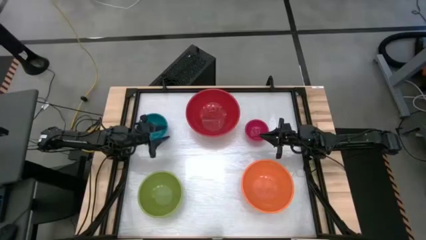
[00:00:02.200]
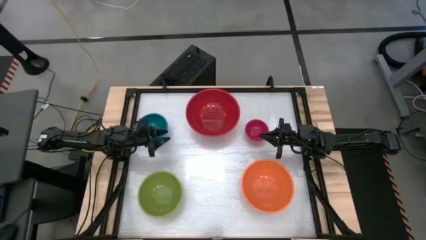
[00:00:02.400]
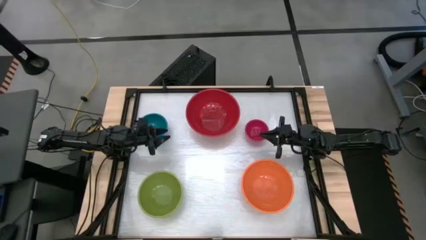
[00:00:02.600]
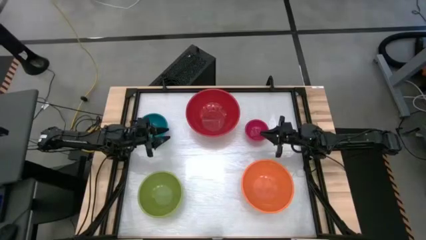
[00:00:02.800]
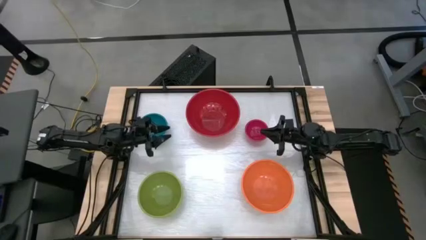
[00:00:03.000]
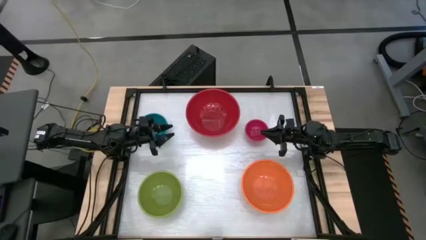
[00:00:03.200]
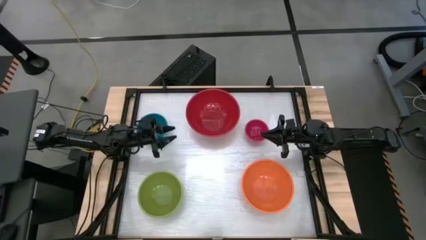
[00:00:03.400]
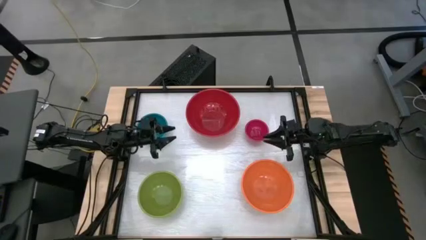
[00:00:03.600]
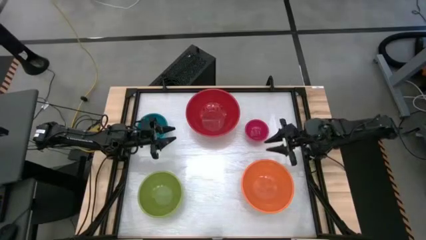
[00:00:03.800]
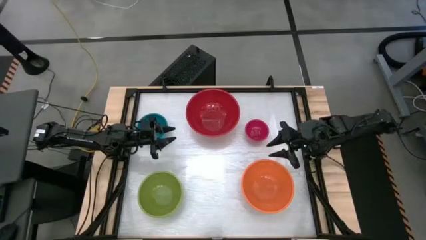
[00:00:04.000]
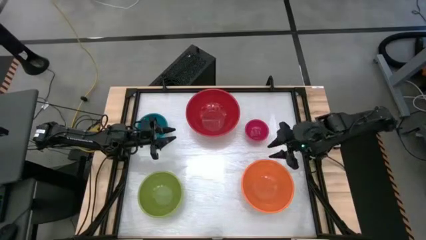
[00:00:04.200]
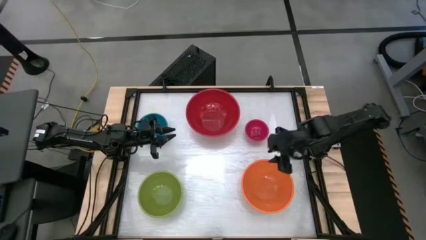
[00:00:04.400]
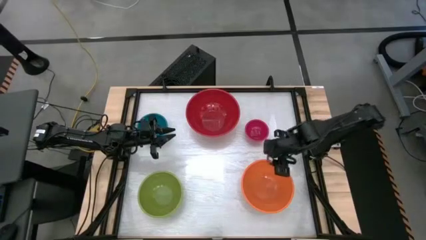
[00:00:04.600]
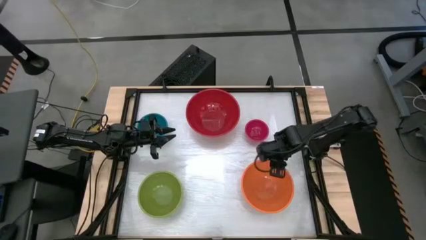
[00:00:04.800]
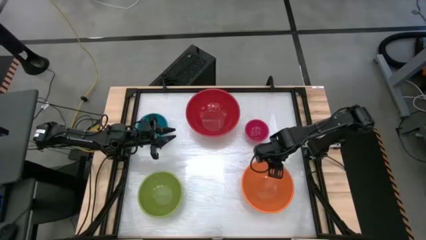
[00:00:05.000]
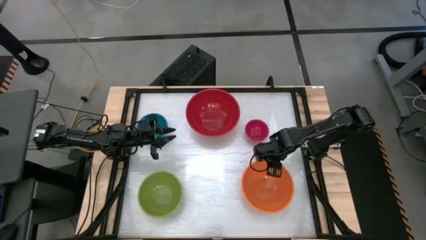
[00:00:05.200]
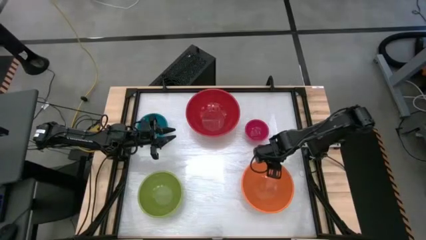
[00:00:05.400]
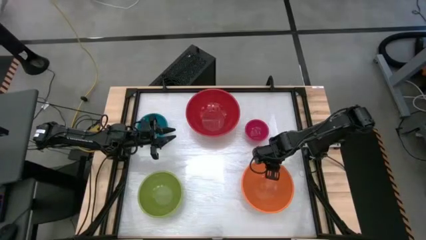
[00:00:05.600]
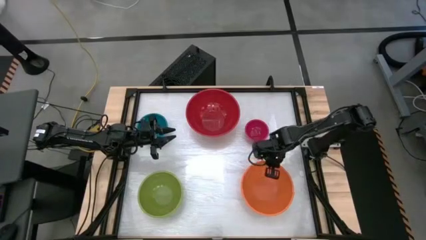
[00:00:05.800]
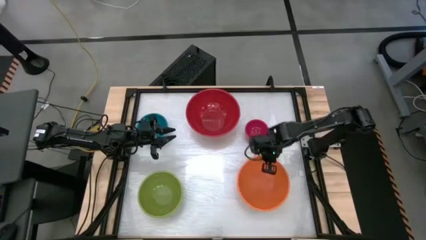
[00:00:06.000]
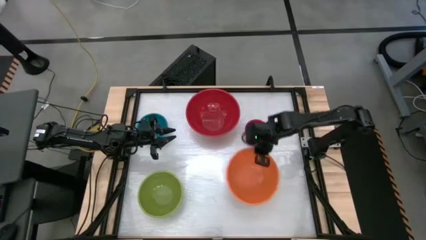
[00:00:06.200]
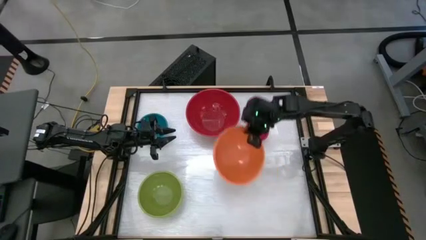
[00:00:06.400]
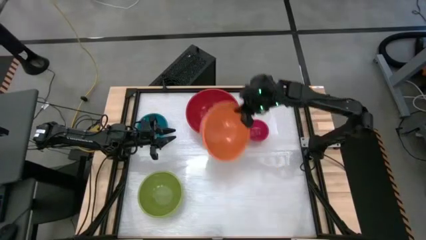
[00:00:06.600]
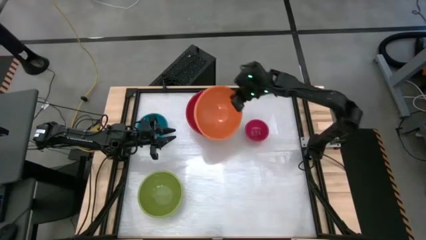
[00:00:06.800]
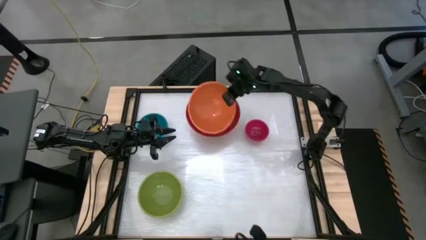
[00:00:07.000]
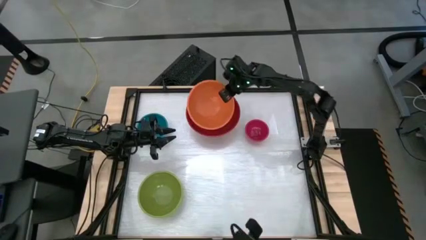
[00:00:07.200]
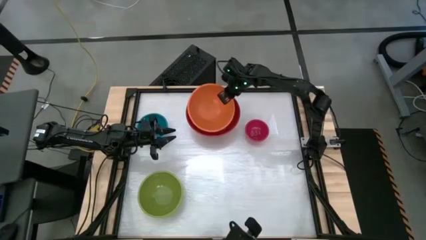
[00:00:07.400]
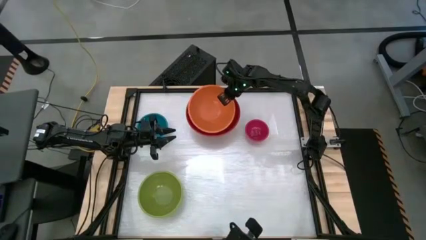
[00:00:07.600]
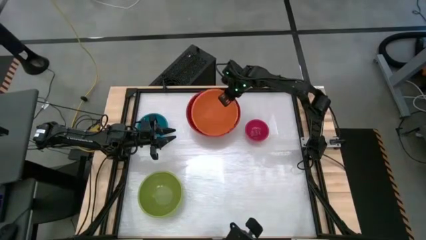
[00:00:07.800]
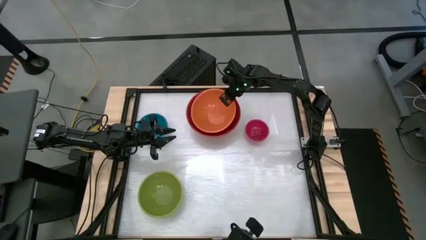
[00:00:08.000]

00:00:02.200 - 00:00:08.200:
Stack the orange bowl on top of the red bowl

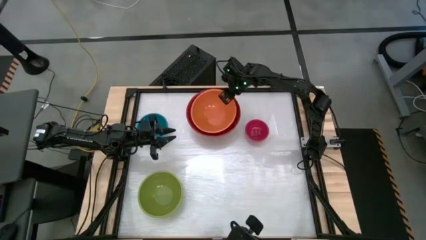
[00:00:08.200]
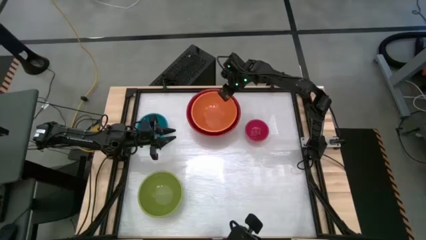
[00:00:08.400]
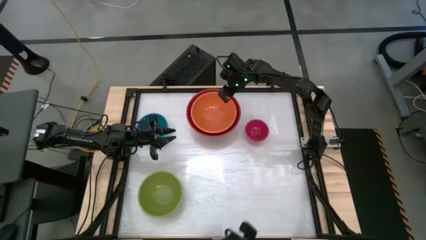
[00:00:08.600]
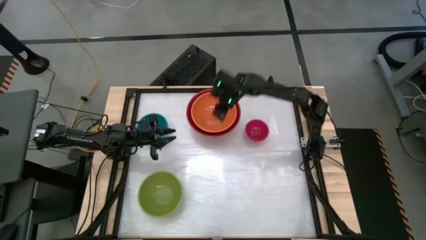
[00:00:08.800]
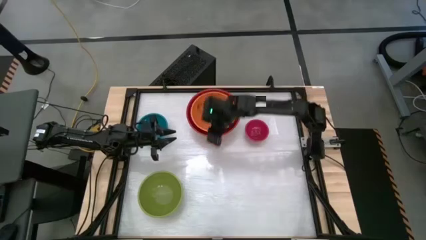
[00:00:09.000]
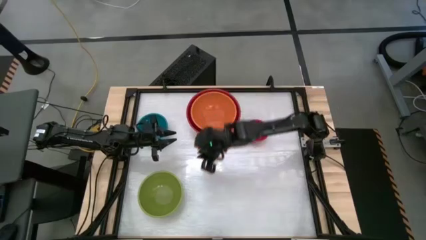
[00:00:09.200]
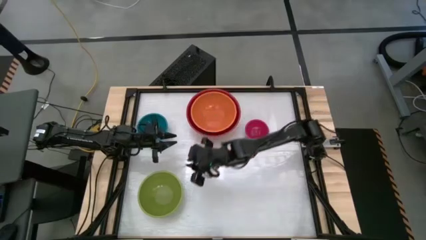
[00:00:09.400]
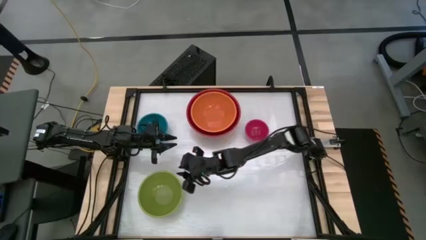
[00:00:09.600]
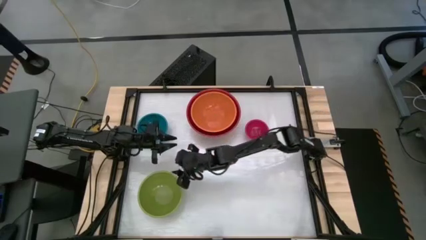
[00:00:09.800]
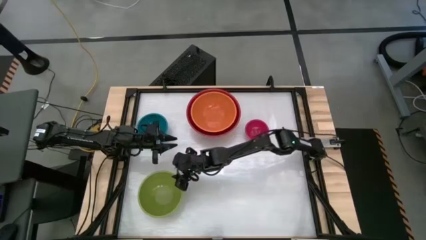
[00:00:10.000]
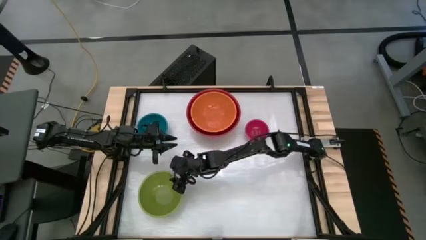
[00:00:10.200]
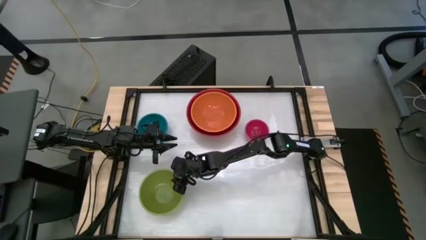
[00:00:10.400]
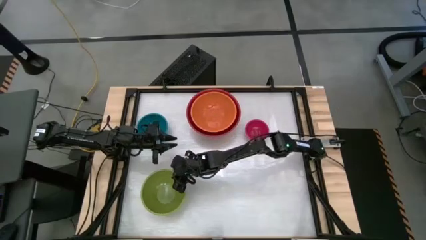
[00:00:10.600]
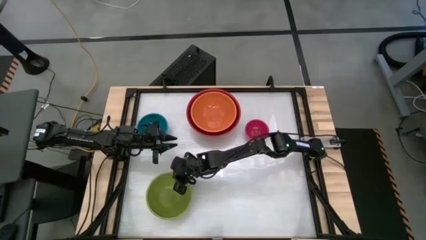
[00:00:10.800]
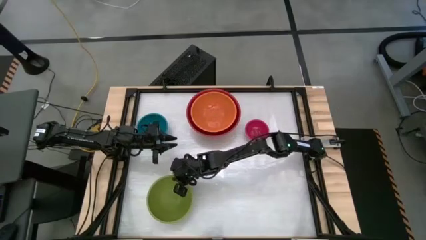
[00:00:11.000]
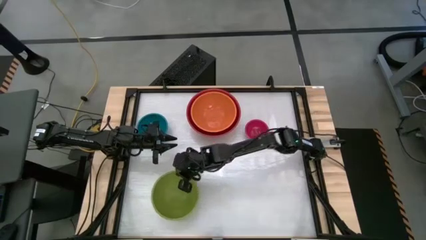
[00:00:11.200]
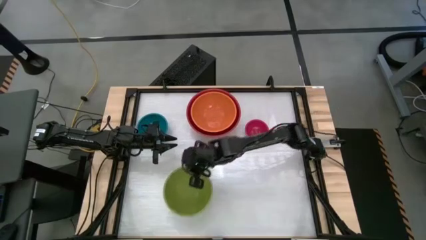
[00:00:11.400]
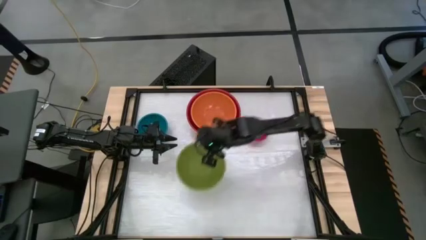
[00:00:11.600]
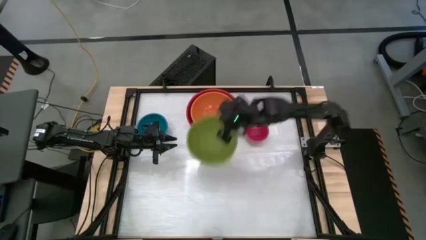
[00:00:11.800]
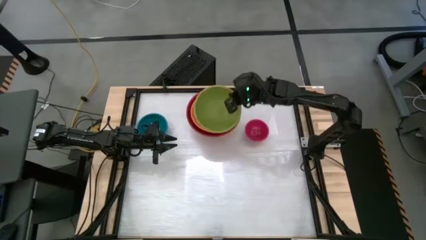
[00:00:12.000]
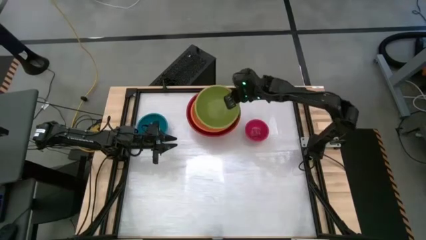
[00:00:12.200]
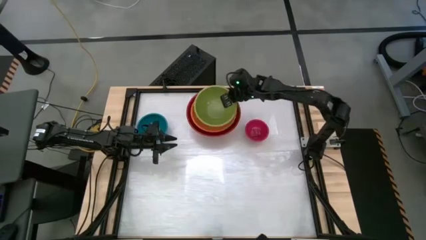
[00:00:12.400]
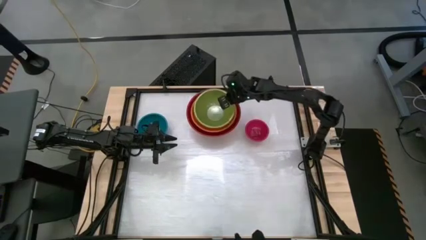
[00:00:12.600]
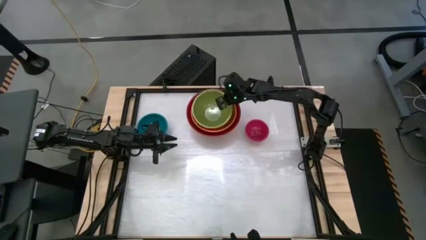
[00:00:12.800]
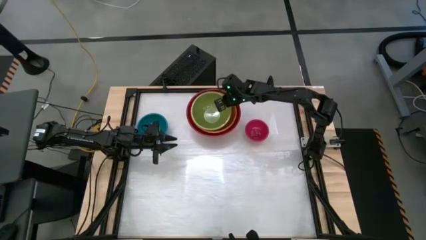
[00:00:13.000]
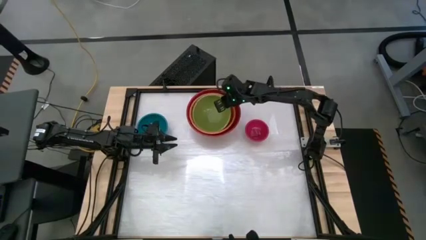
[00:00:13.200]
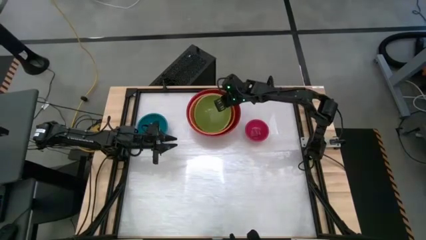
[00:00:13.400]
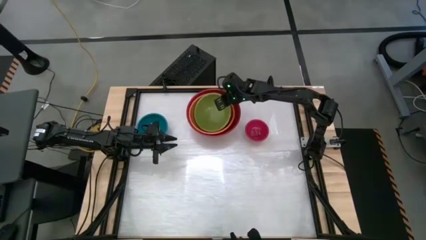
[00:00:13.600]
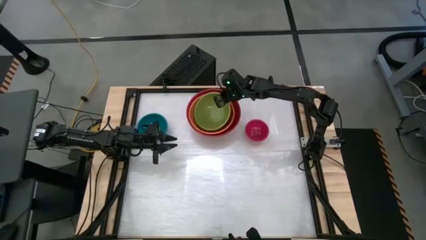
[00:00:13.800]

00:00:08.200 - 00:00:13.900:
Stack the green bowl on top of the orange bowl
